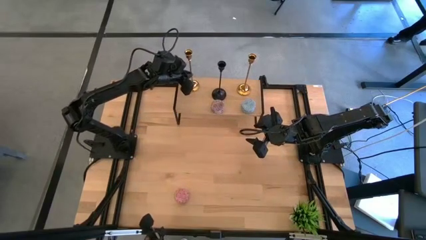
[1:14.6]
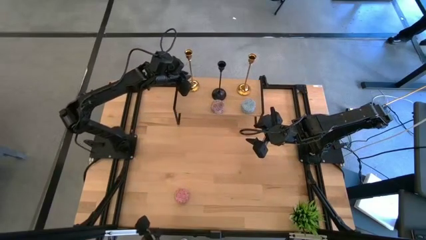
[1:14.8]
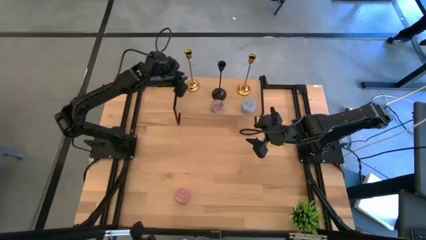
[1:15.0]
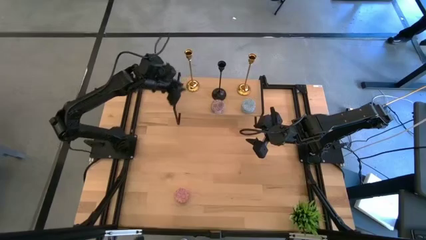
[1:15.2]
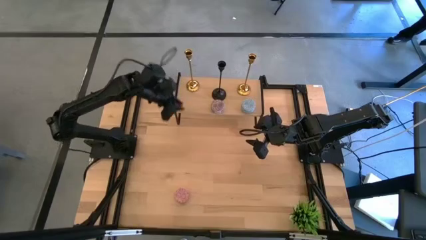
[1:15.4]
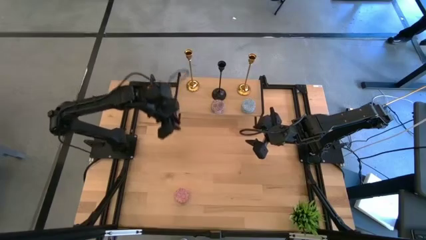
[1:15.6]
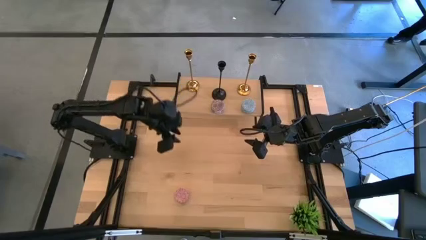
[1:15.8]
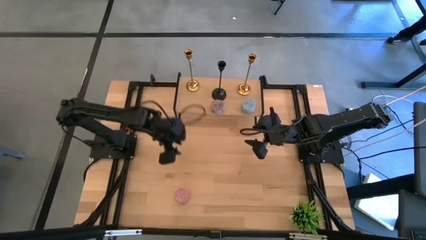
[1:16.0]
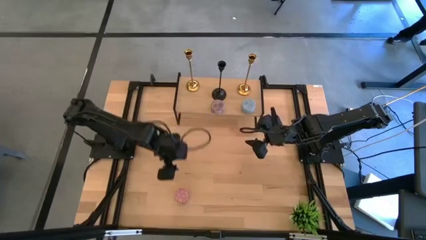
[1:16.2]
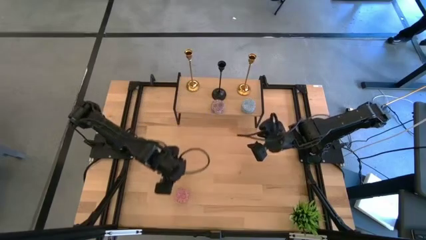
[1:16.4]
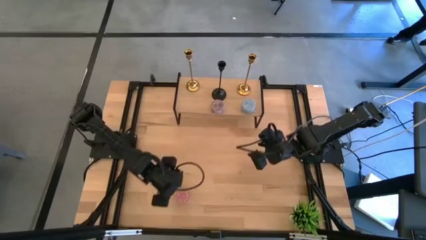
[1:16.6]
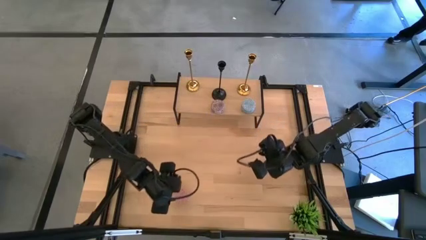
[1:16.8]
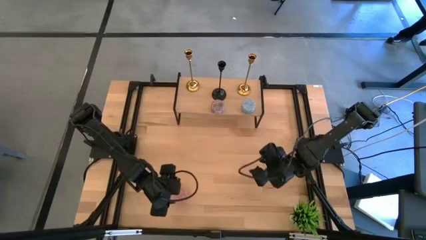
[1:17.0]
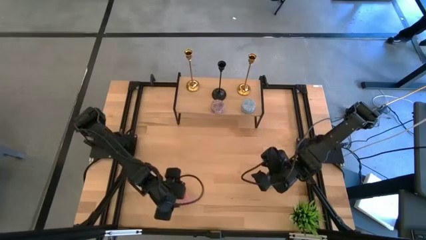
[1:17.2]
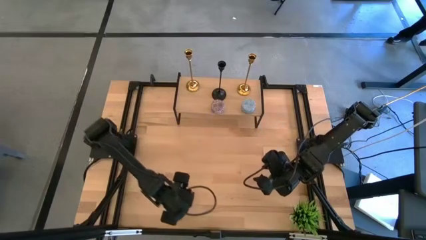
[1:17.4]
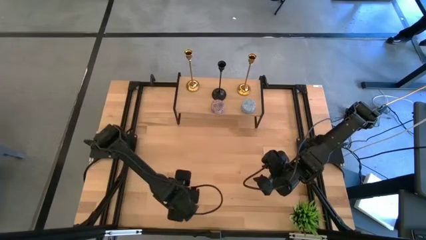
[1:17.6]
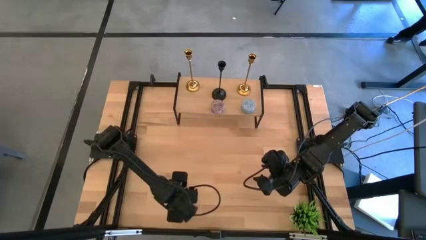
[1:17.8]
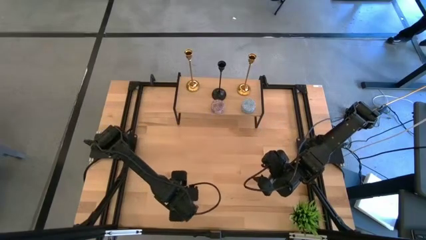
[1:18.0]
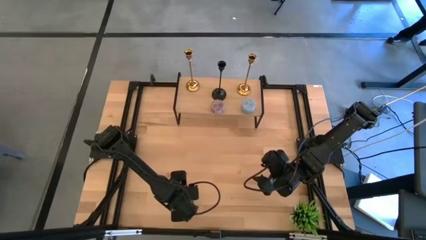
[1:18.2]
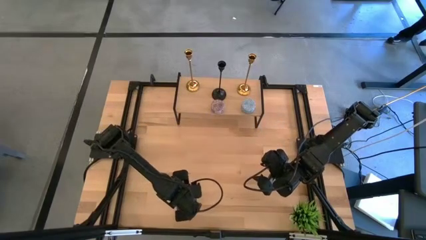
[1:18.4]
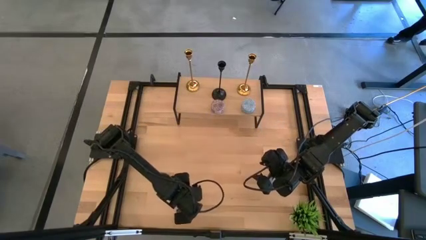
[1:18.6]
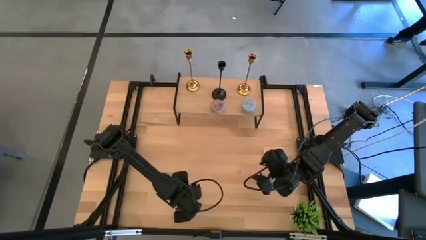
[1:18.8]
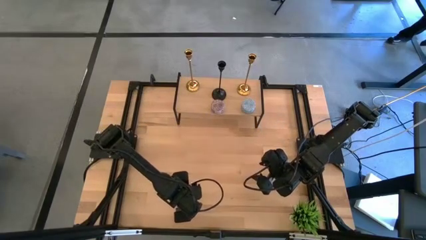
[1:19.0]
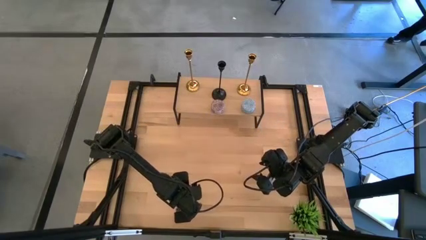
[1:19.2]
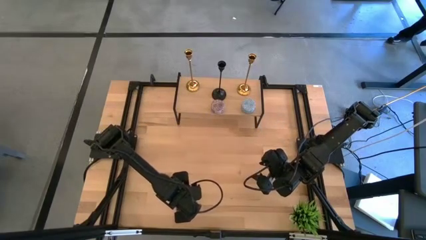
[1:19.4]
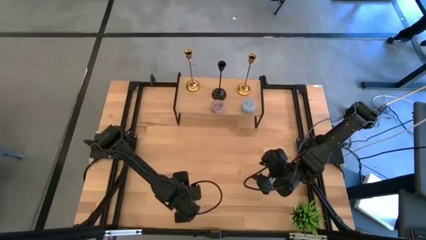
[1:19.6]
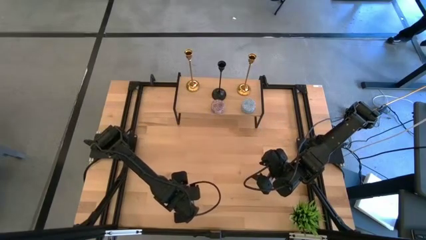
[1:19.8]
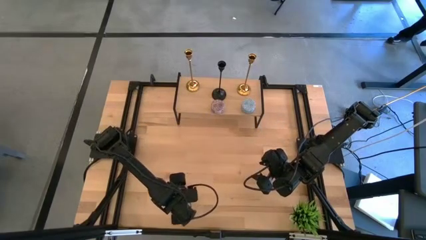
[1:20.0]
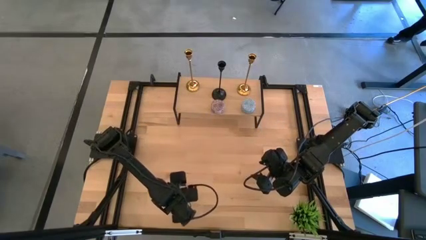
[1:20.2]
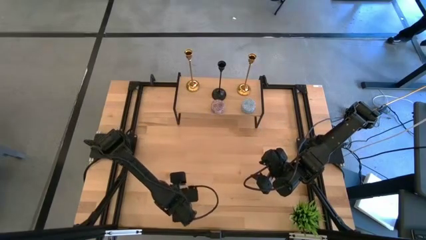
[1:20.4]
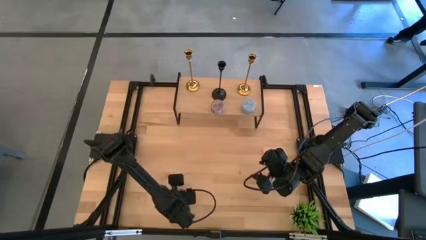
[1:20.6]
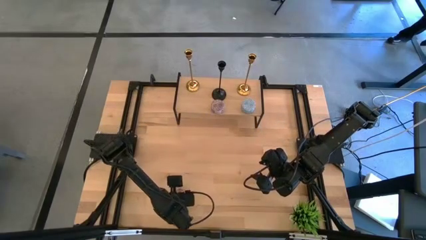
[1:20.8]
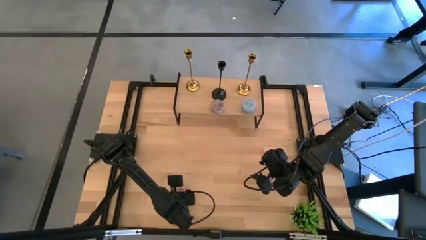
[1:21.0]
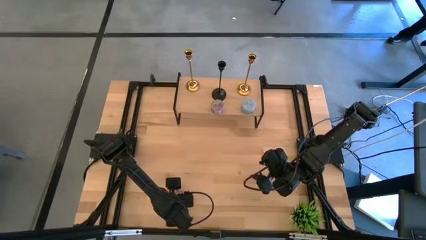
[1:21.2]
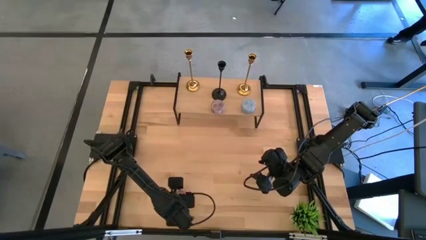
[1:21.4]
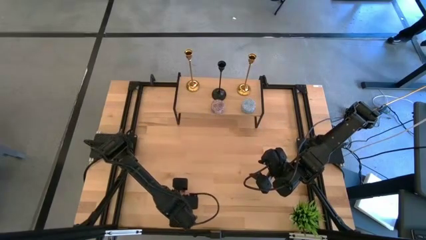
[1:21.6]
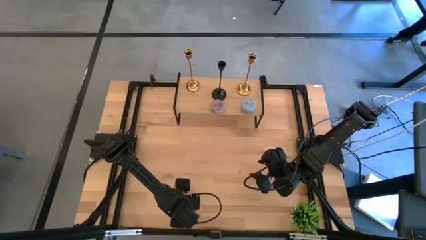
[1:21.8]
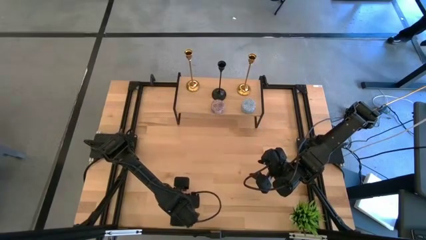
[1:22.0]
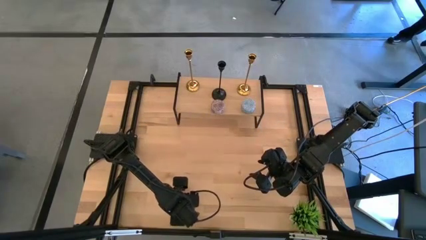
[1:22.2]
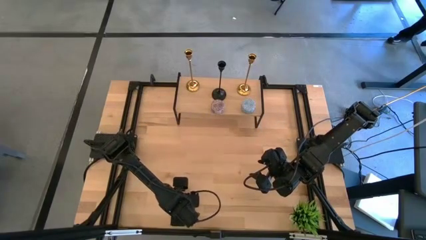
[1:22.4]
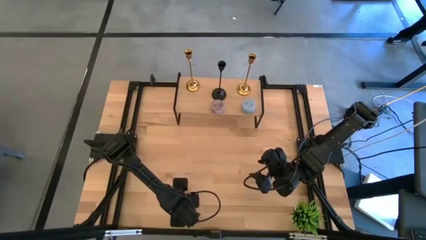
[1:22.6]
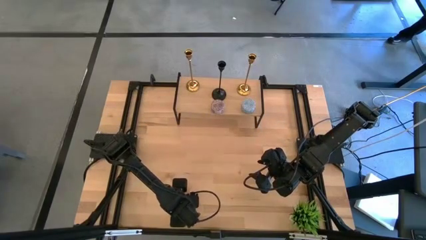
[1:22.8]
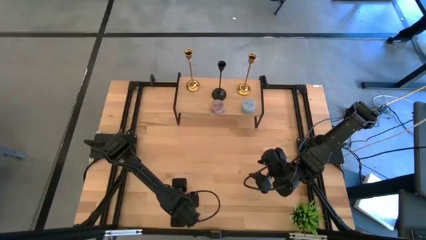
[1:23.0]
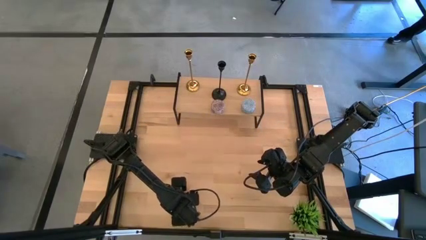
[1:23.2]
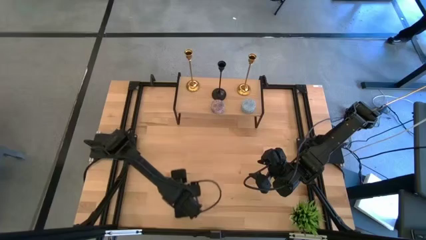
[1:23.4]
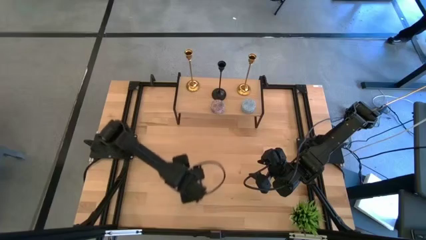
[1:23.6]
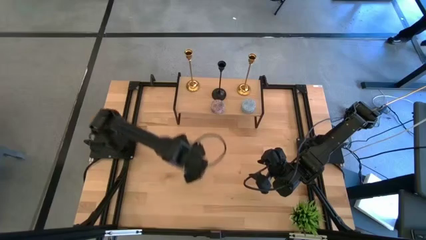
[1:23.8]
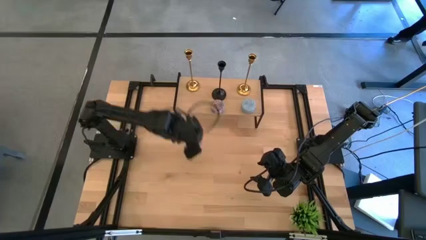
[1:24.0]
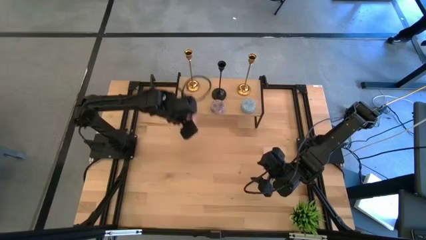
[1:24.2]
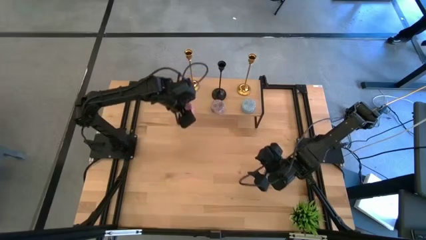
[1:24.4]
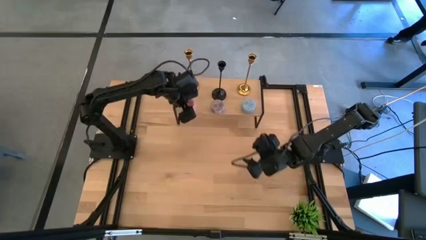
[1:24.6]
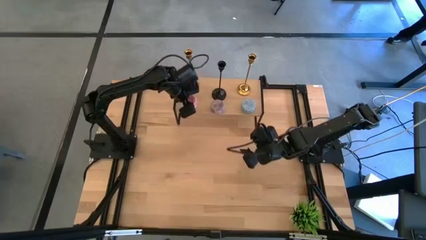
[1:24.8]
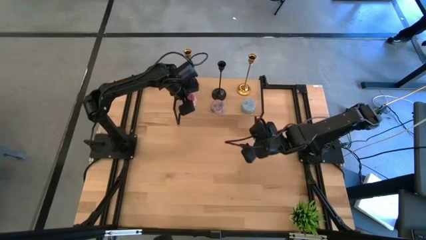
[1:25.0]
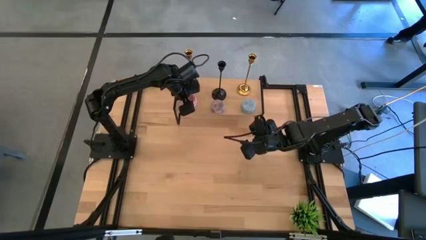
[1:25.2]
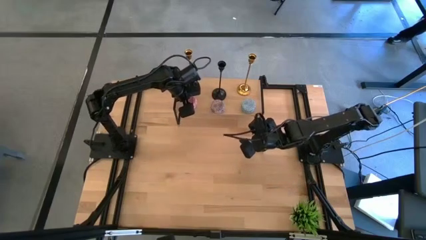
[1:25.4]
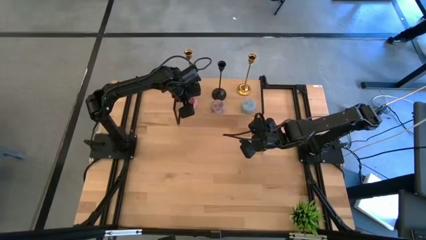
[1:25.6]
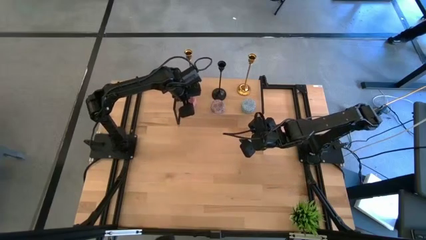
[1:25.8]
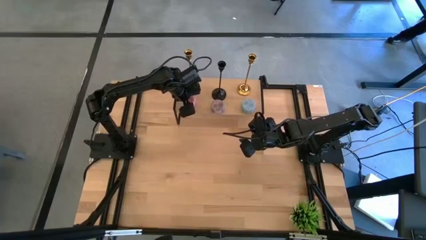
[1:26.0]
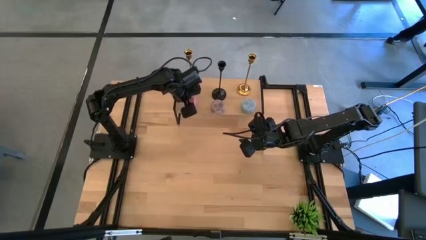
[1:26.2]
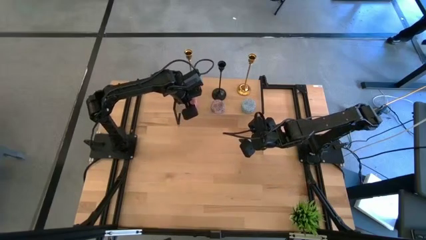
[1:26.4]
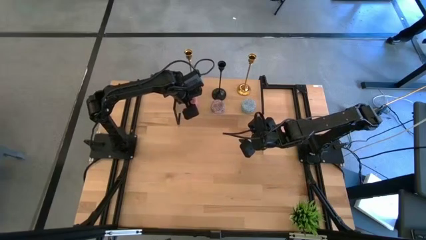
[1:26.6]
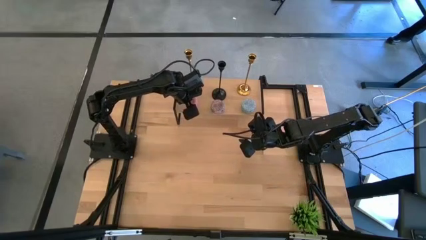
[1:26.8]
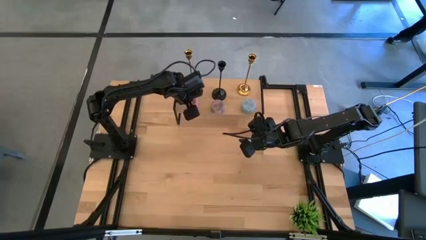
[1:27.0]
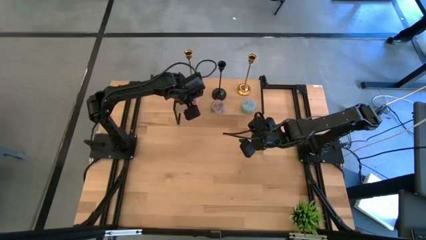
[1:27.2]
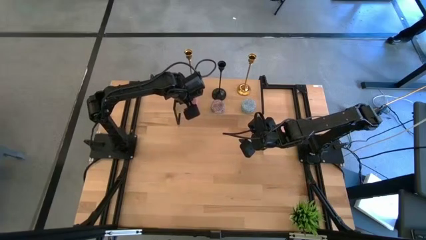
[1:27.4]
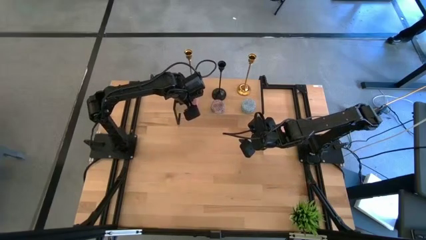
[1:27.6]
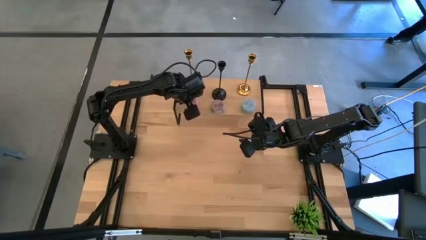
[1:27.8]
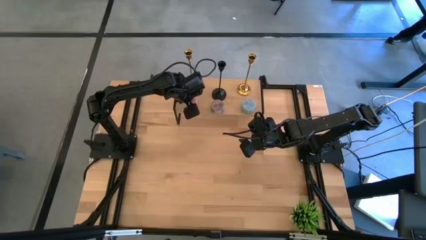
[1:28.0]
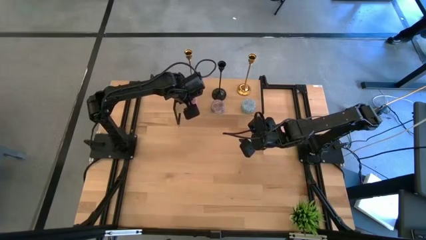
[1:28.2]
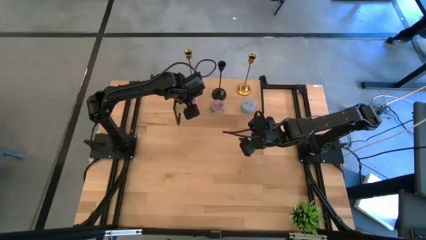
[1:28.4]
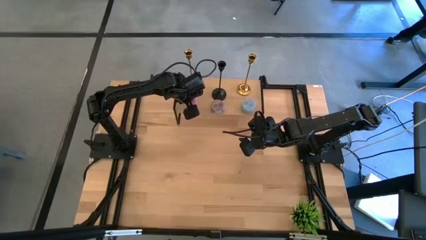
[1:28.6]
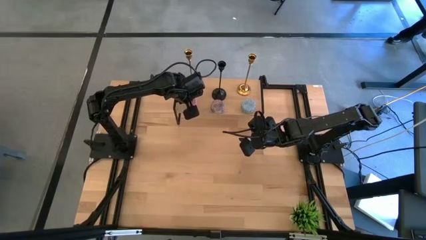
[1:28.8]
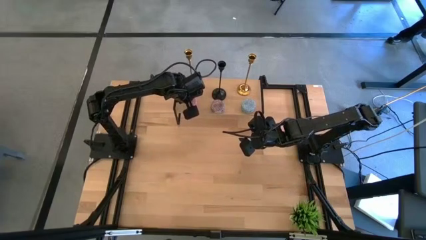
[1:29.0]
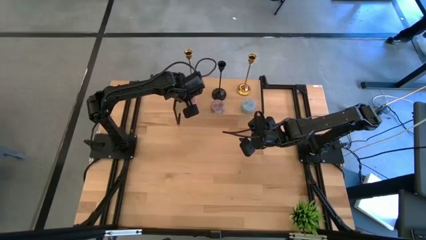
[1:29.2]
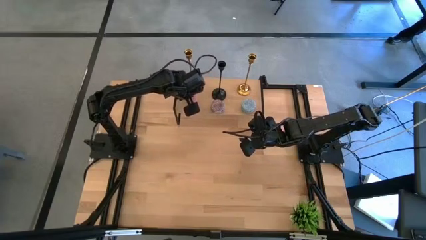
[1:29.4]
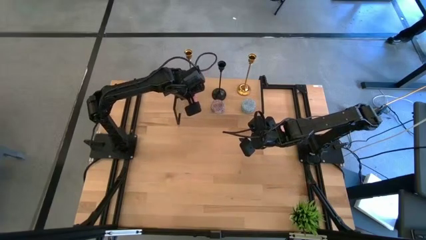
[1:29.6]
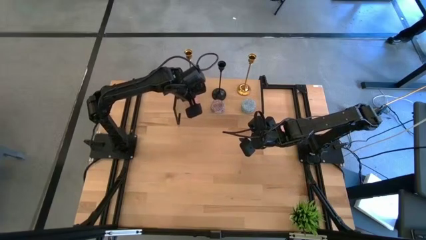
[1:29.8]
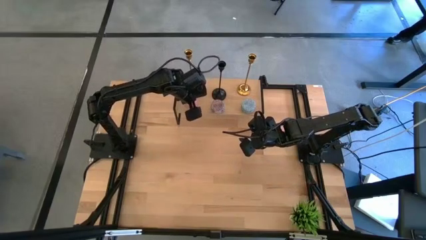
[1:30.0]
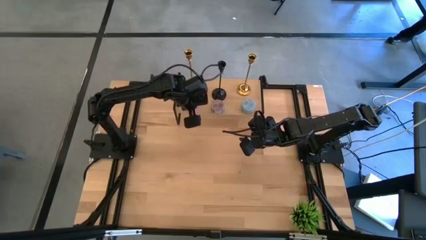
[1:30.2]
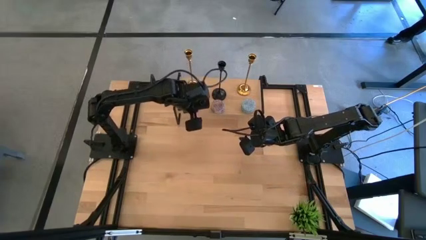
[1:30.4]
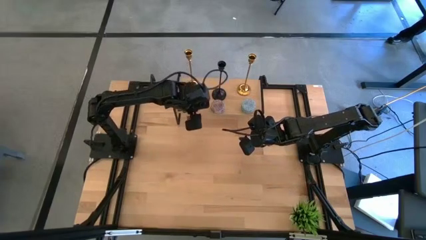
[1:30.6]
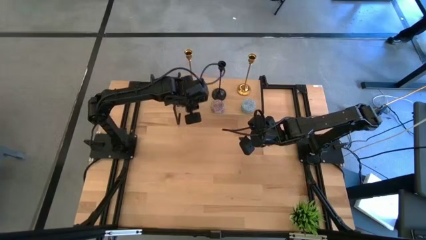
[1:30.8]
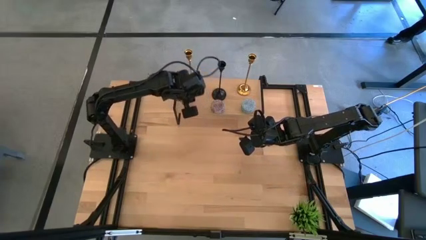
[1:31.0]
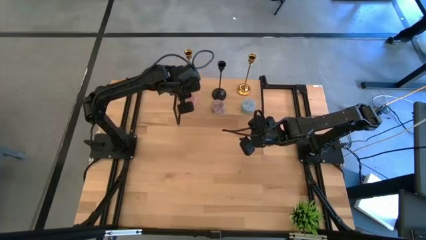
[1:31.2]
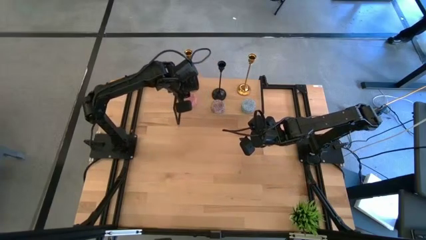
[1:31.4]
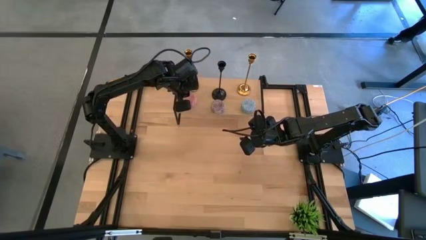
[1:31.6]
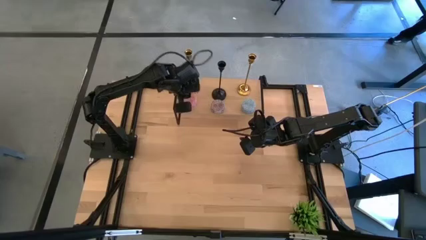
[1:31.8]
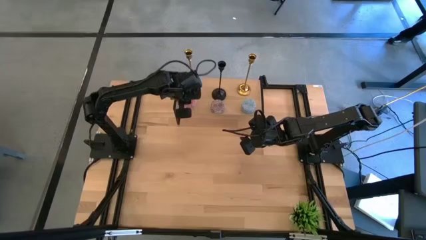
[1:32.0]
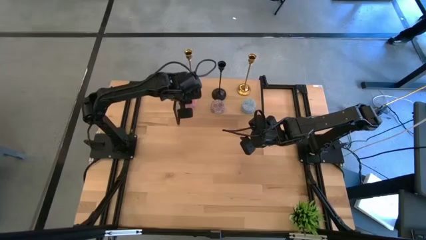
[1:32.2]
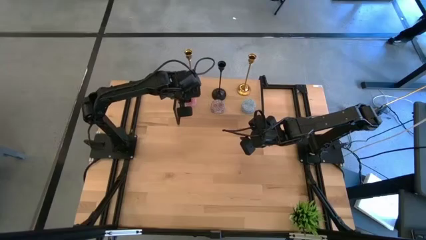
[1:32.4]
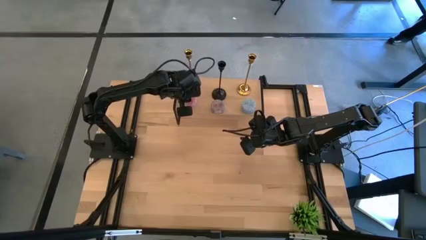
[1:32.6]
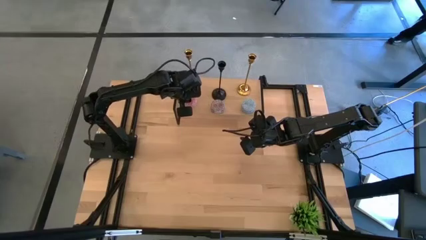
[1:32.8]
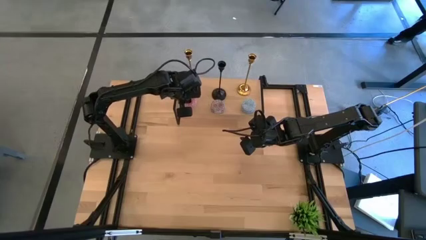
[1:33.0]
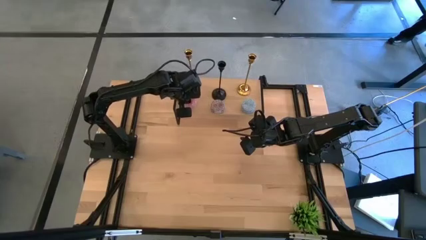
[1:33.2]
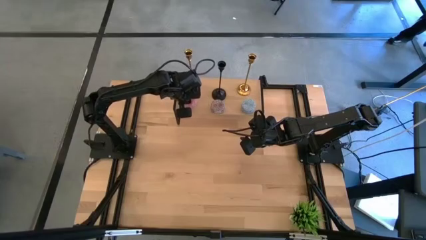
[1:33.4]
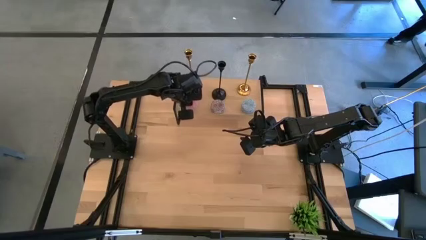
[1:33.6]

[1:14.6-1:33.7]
Task: Pick & Place candle stick holders
Put the pink candle on the shelf
